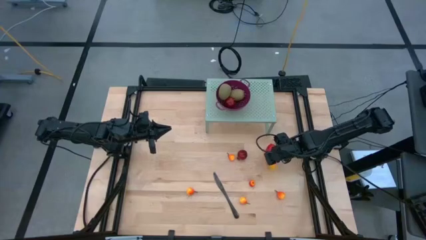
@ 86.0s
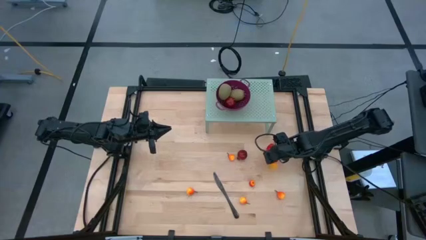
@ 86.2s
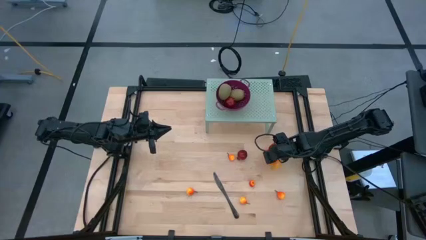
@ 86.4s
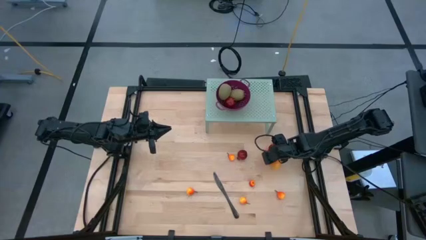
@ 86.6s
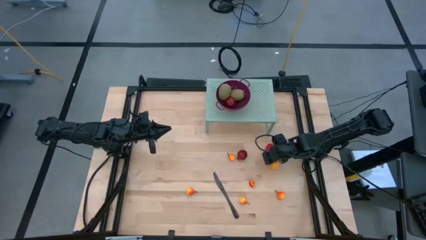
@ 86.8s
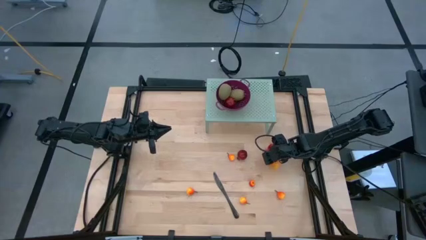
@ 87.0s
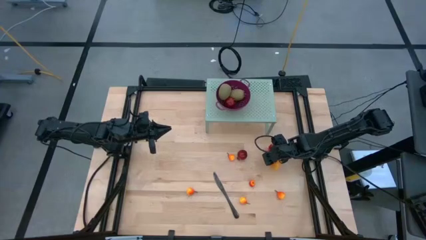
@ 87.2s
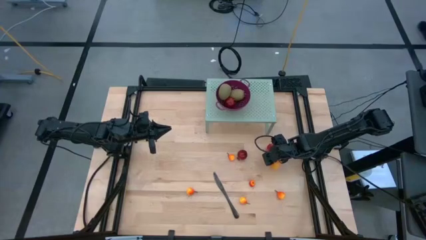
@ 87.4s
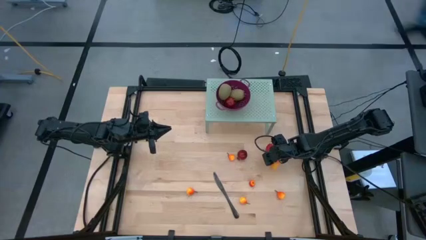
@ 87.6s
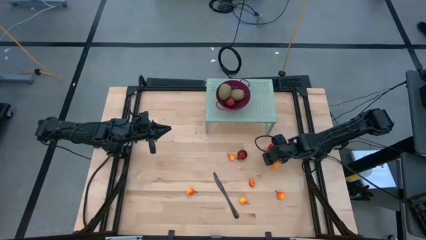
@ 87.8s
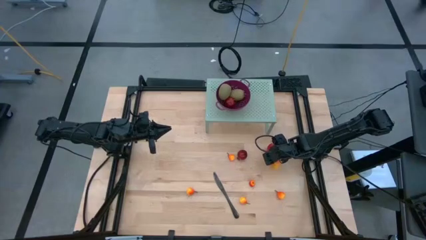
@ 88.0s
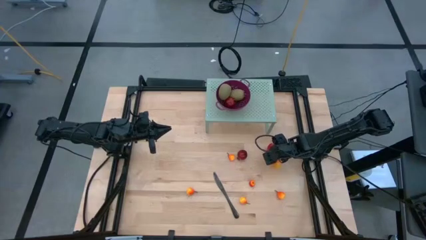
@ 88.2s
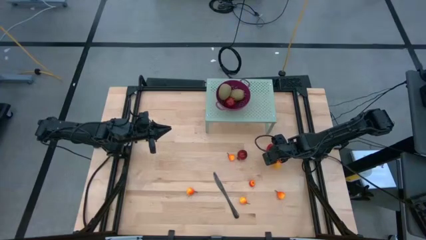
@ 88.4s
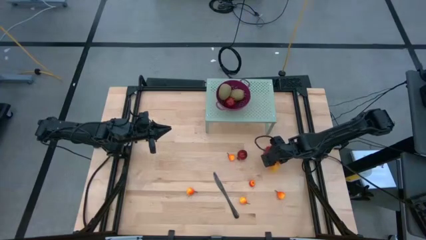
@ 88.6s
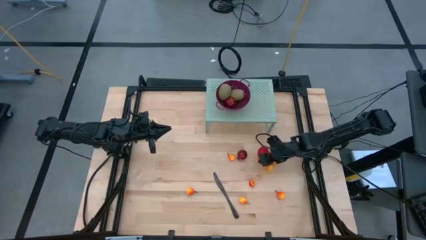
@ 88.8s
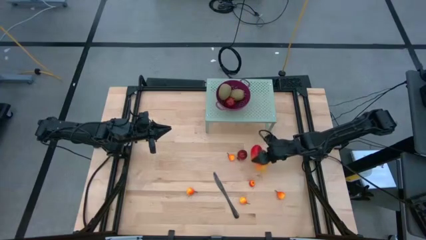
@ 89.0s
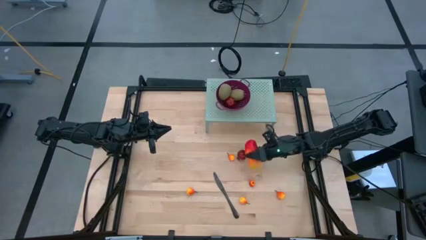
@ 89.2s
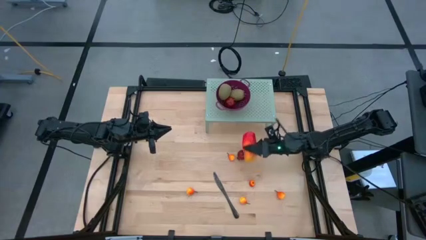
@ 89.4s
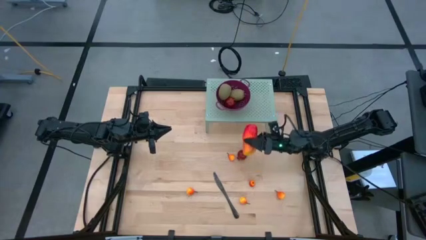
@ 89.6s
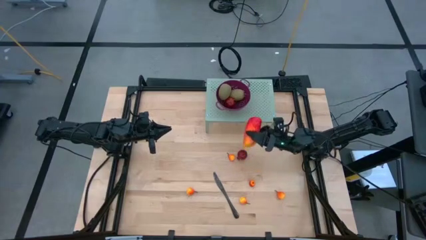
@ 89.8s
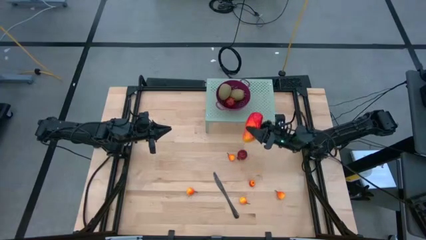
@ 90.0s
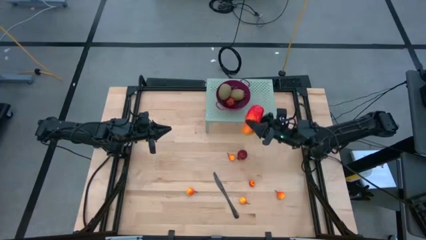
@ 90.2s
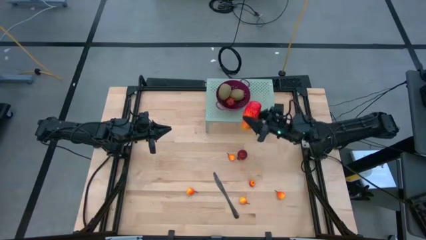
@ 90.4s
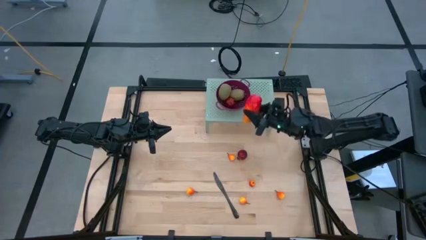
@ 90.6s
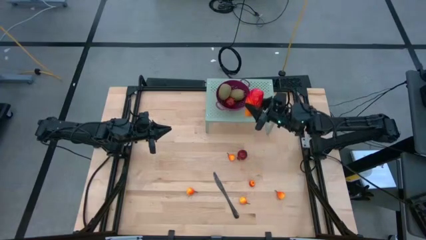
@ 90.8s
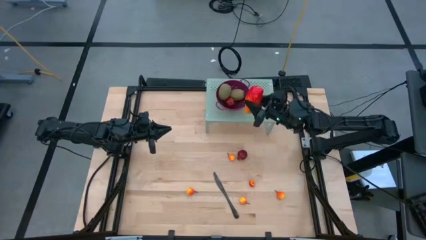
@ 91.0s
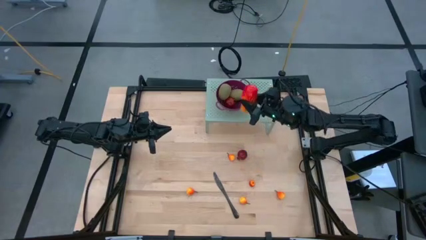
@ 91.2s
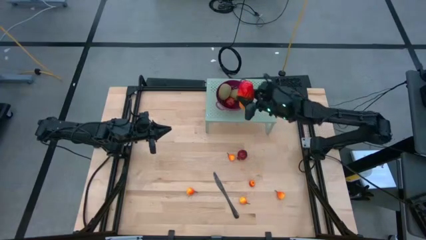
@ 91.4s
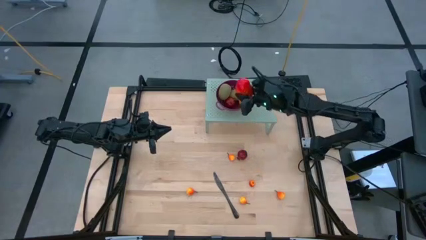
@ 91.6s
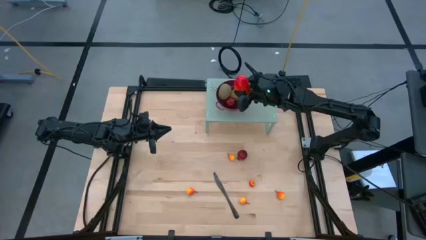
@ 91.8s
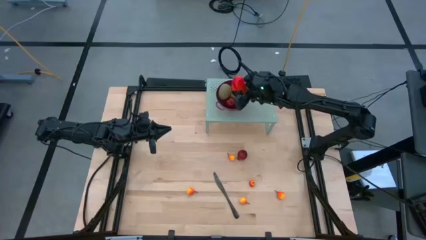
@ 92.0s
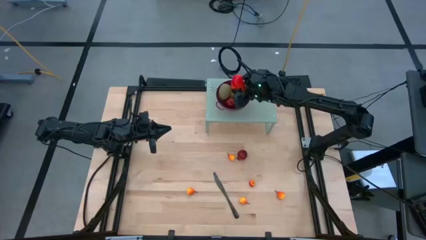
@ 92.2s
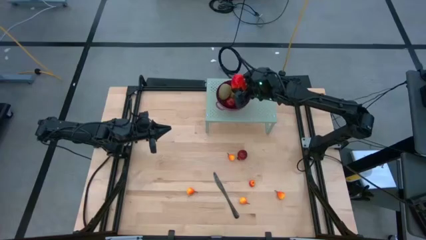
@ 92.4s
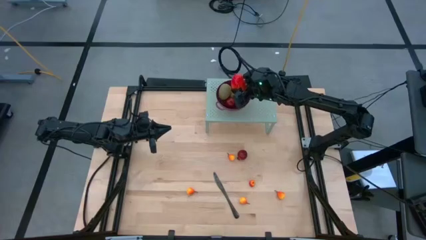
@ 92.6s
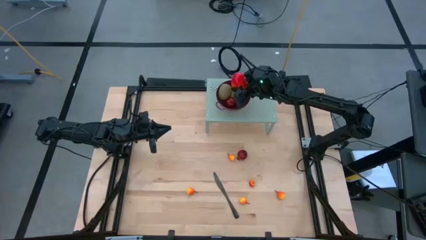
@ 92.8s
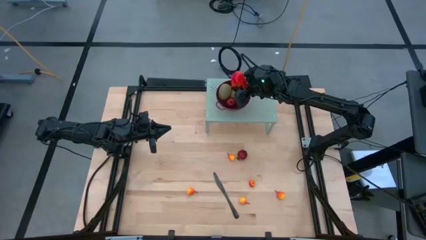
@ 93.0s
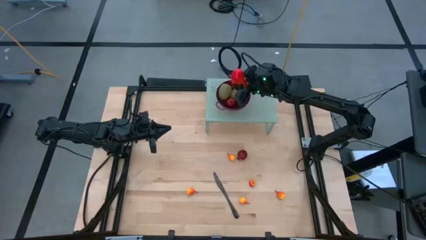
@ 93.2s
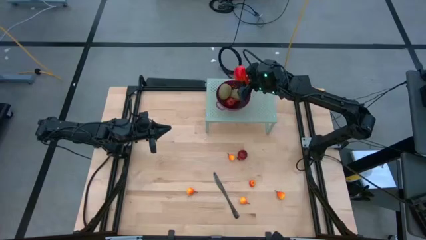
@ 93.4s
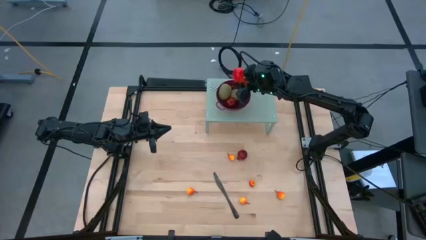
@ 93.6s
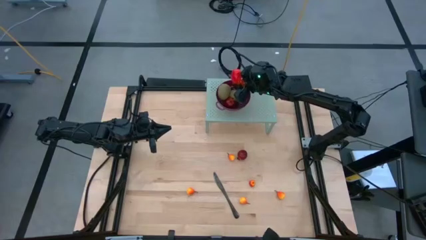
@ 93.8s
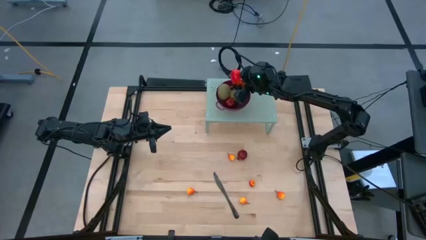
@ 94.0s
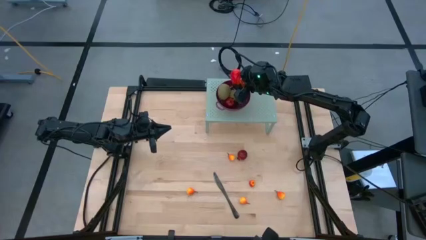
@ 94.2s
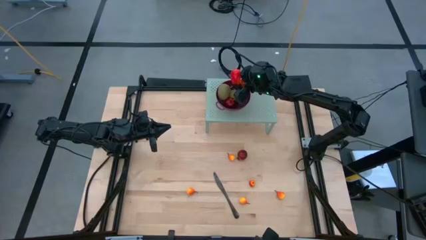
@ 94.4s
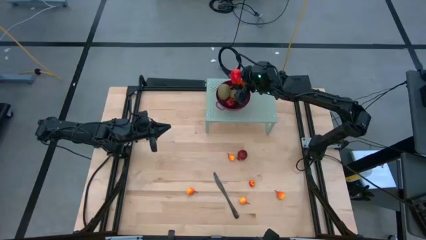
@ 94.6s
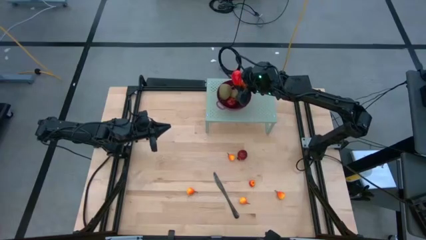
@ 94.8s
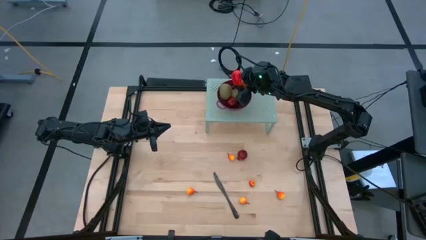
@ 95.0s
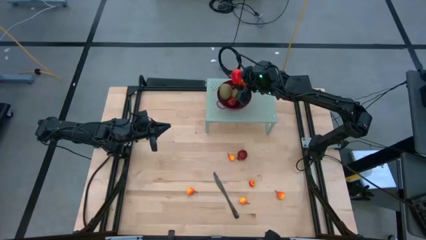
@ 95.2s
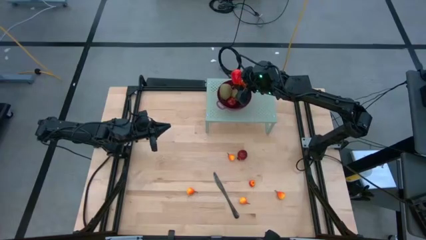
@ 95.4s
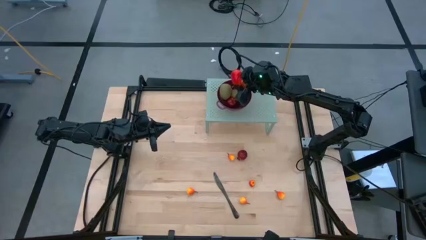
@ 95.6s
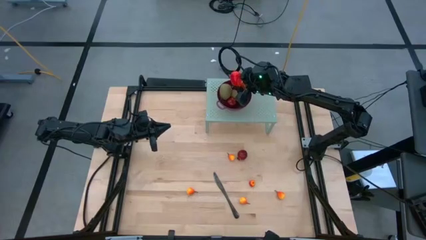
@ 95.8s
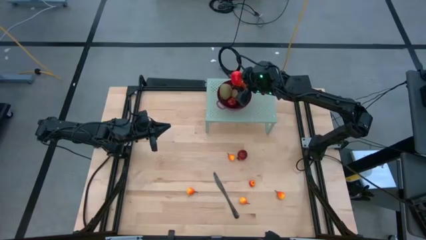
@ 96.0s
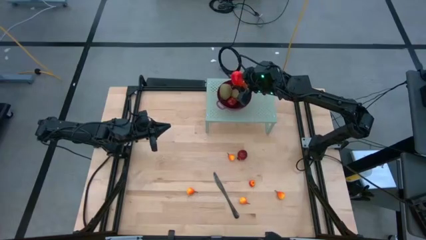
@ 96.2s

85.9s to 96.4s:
Task: Pick & Place Fruit
Put the red mango into the violet strainer bowl on the shelf

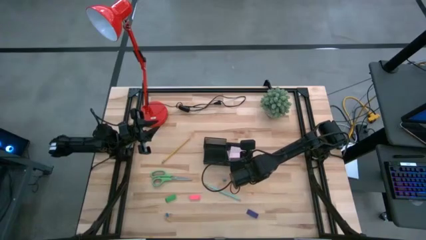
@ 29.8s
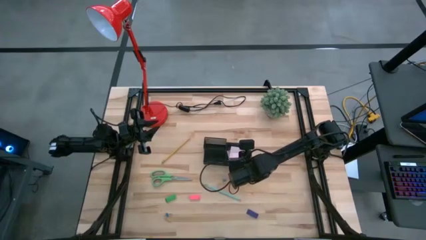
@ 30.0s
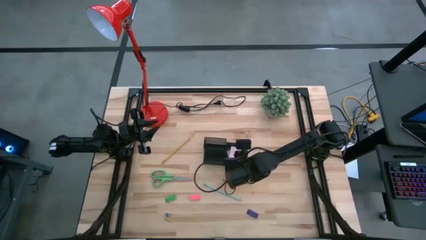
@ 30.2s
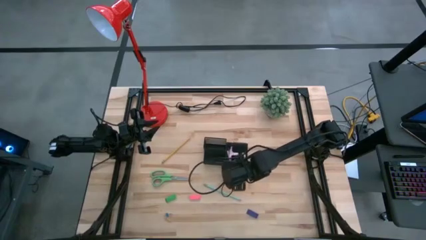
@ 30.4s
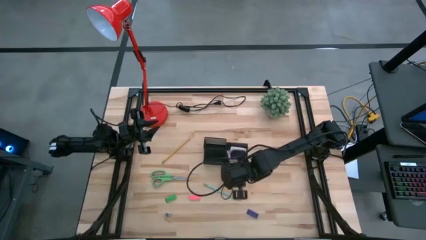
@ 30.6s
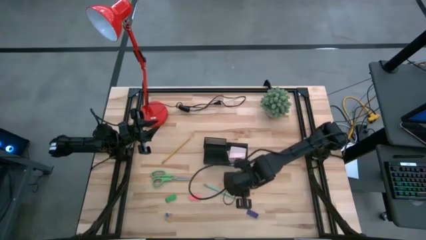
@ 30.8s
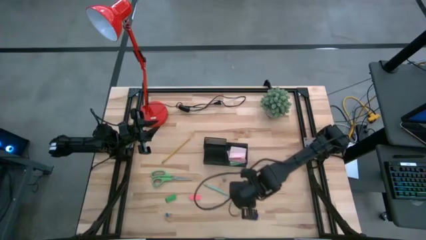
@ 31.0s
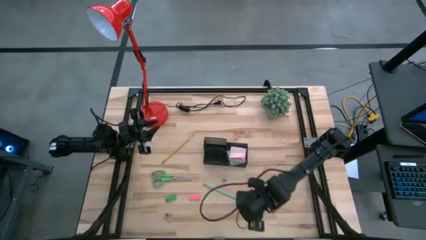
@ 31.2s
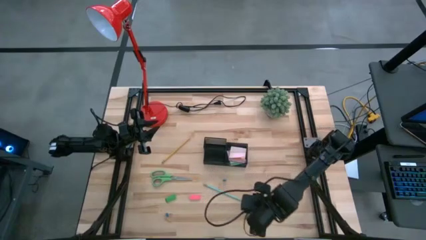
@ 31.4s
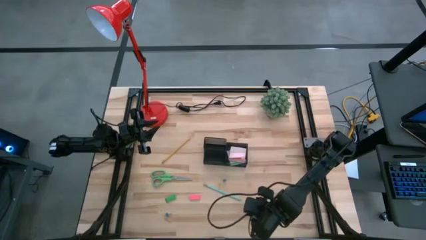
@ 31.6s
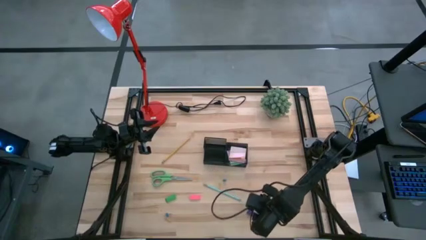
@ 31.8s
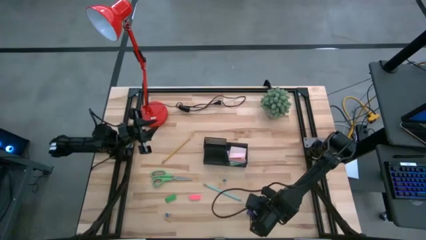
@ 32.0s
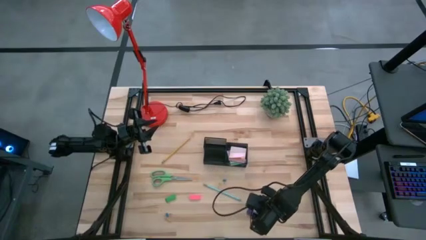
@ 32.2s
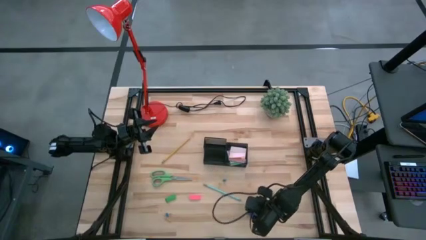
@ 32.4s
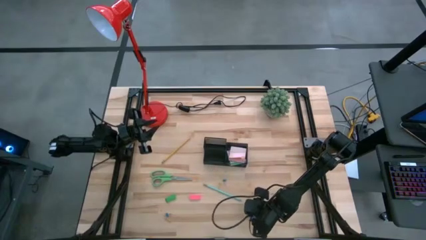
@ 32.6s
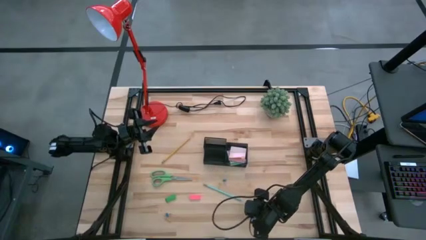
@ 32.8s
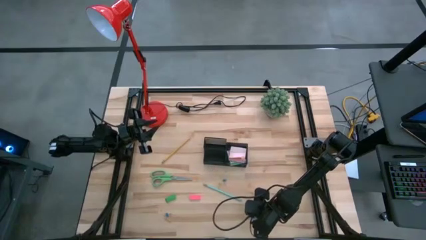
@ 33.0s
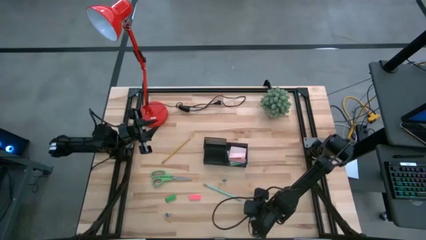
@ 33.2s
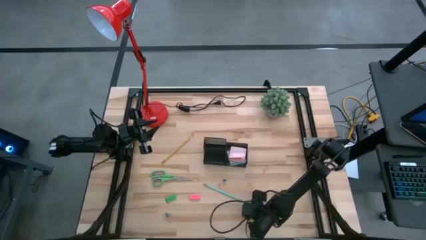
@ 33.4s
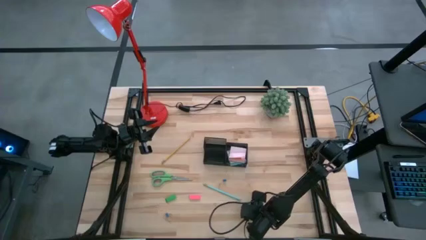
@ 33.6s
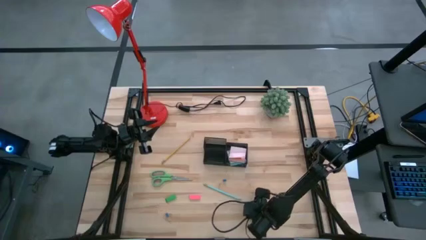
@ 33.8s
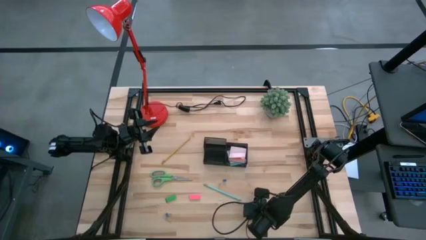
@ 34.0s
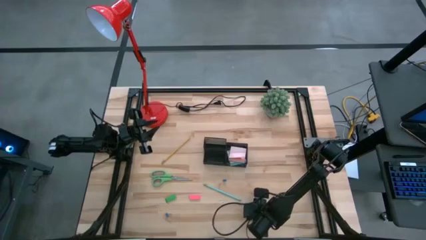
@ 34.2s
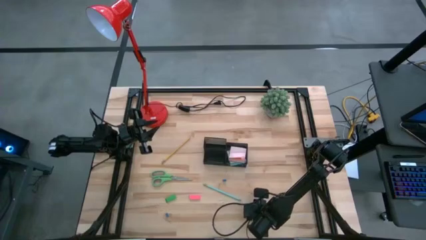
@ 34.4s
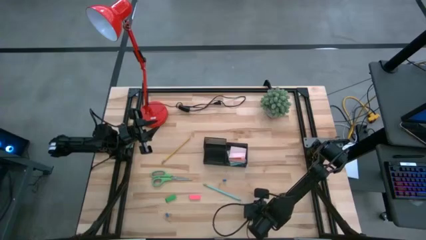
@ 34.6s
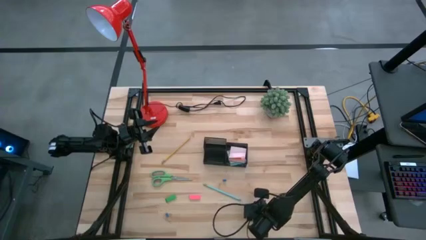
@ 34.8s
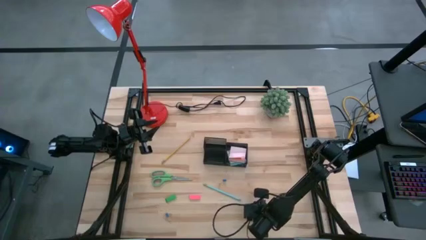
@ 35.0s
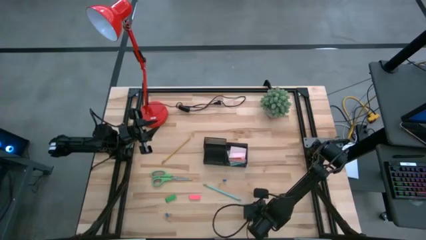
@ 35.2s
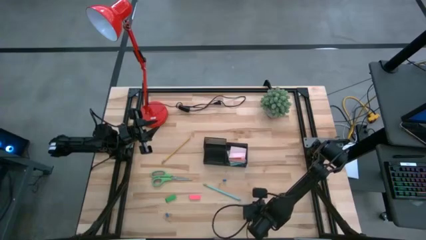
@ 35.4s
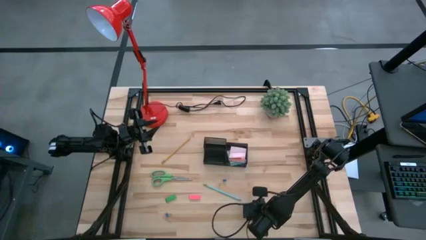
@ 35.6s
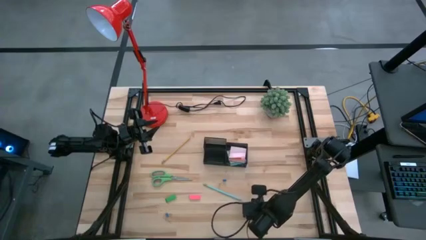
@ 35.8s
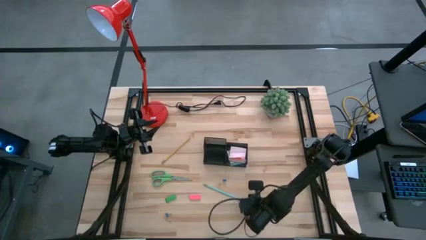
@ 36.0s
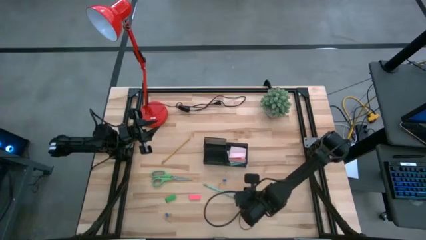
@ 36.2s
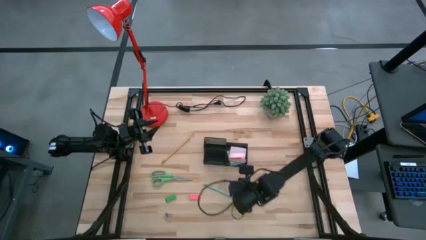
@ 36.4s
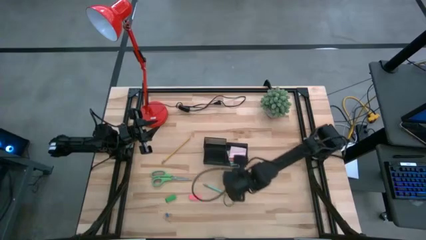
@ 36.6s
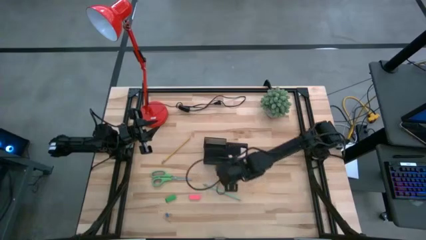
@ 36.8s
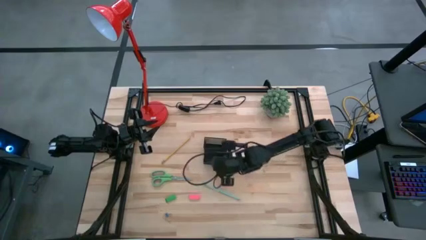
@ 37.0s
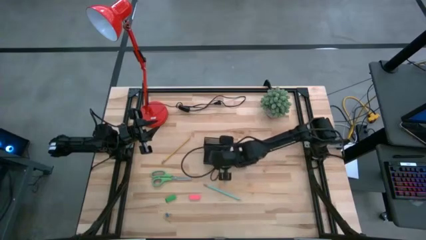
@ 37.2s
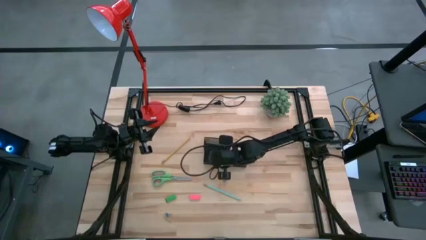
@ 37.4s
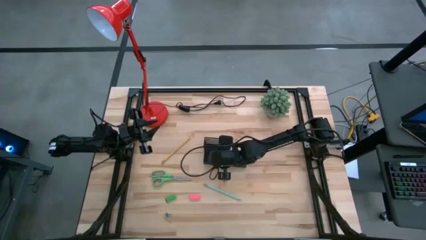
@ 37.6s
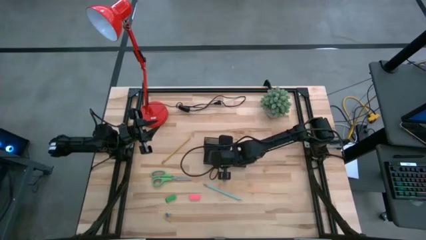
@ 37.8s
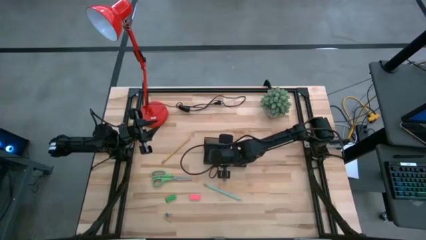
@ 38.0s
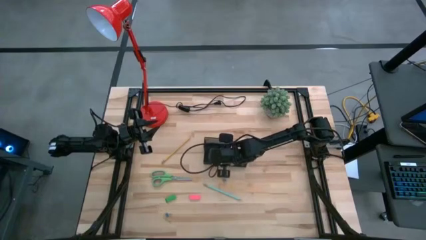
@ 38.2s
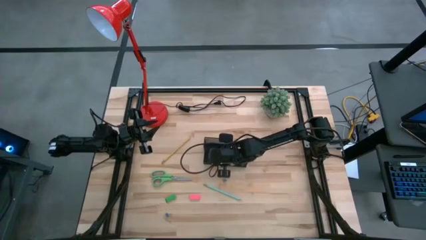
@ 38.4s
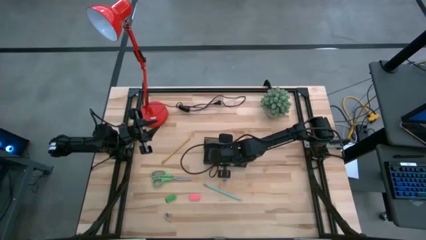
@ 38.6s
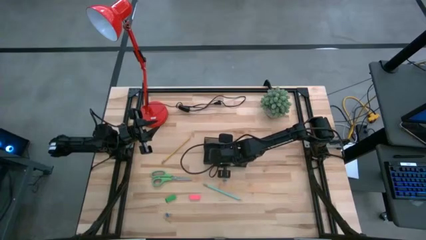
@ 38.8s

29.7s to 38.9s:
Task: Pick and place office supplies into organizer
Put the blue eraser into the black desk organizer
